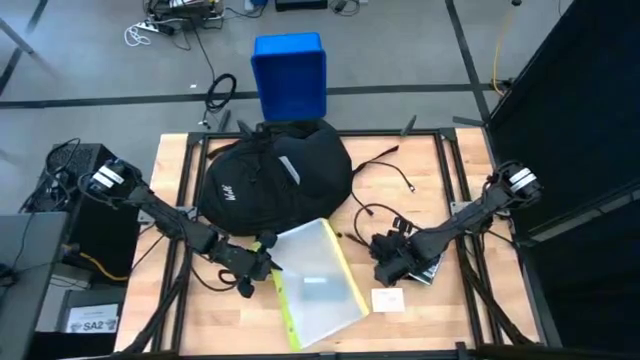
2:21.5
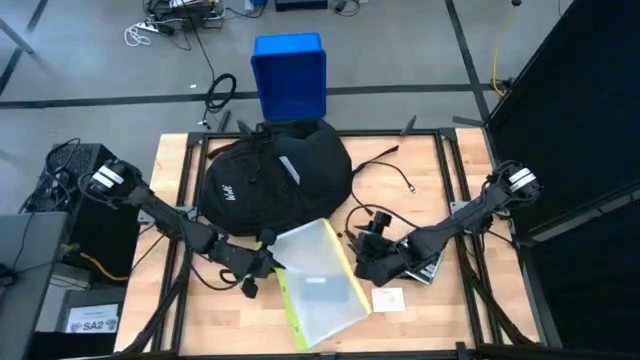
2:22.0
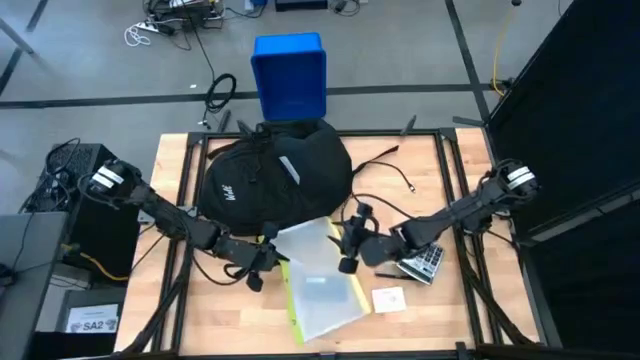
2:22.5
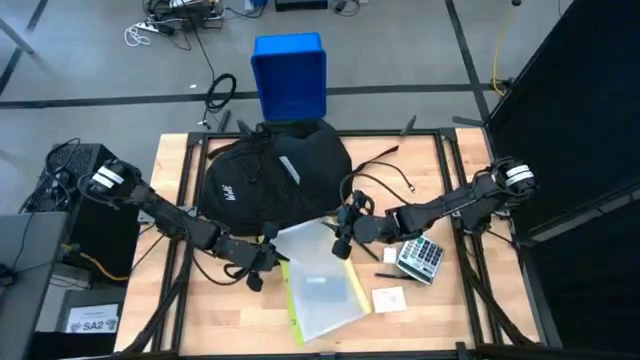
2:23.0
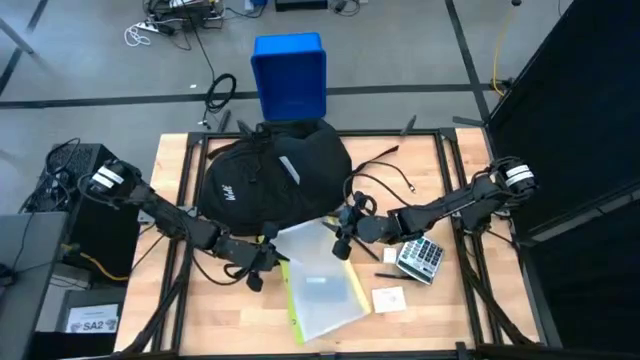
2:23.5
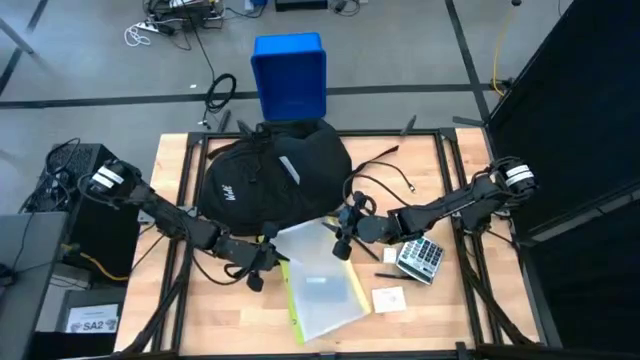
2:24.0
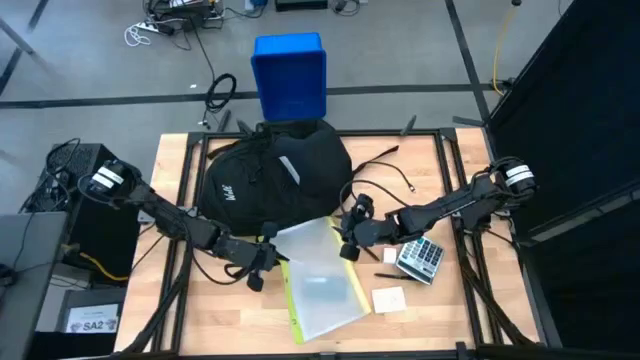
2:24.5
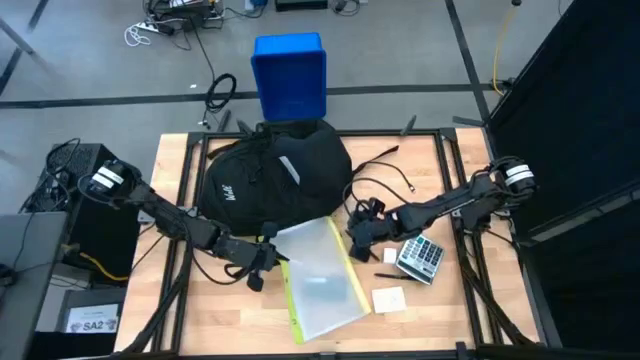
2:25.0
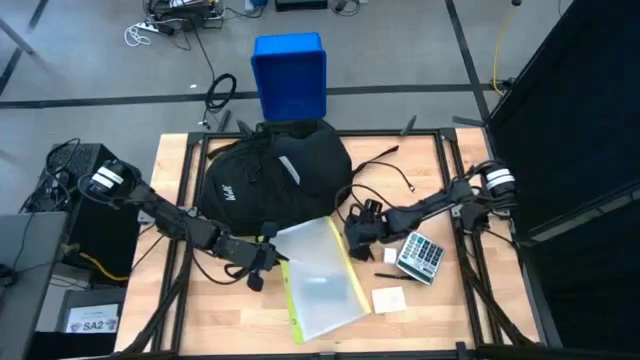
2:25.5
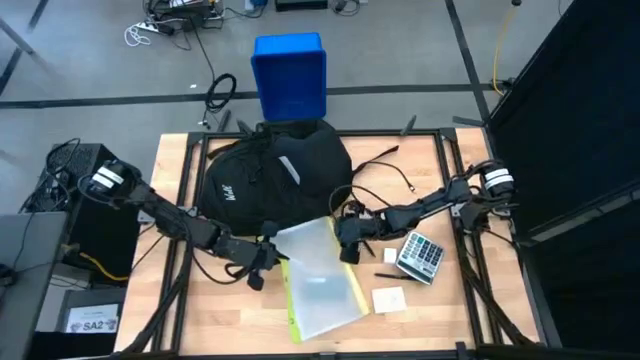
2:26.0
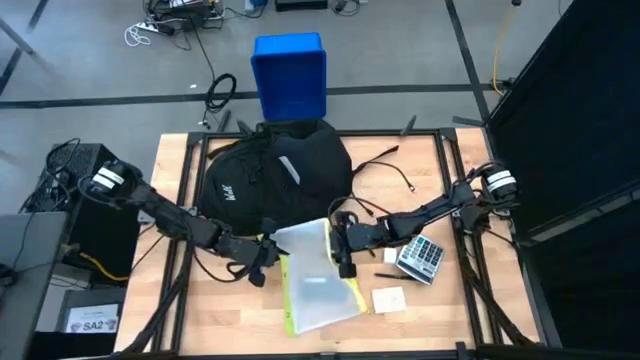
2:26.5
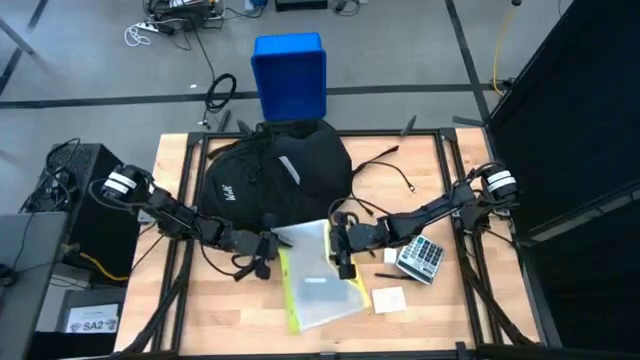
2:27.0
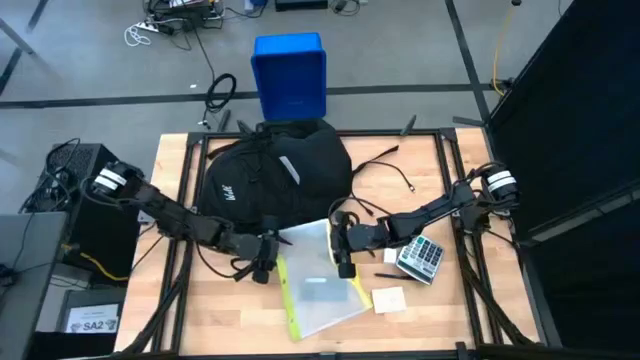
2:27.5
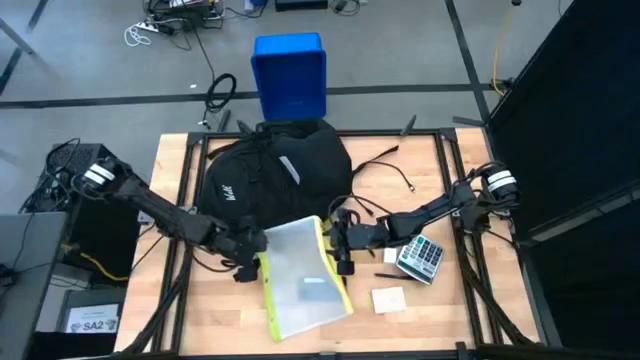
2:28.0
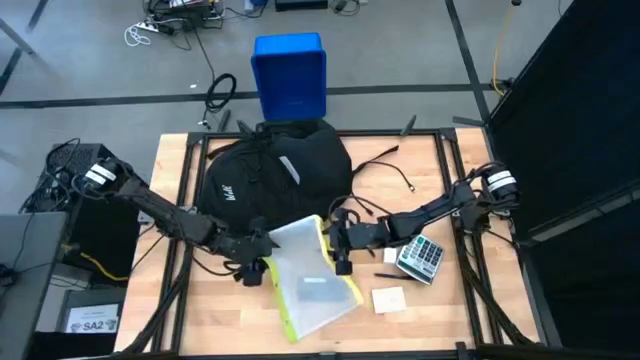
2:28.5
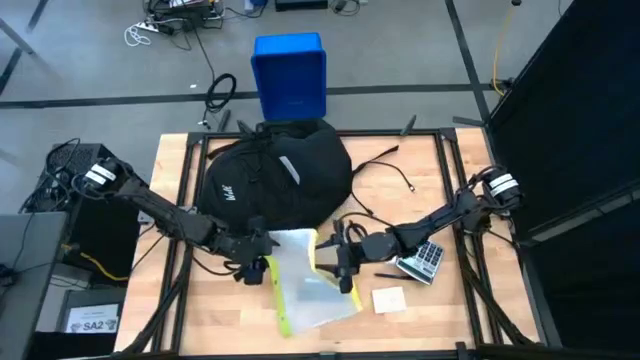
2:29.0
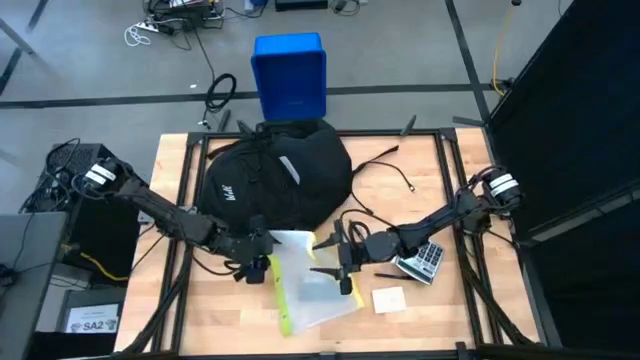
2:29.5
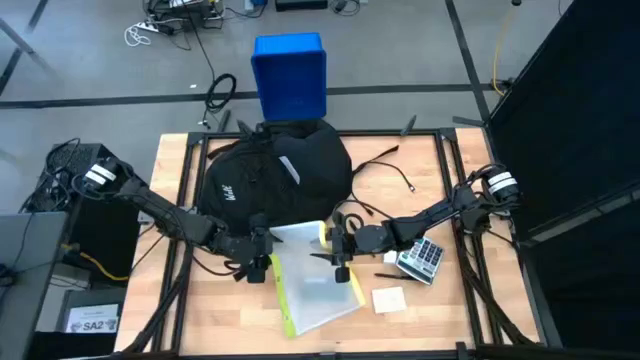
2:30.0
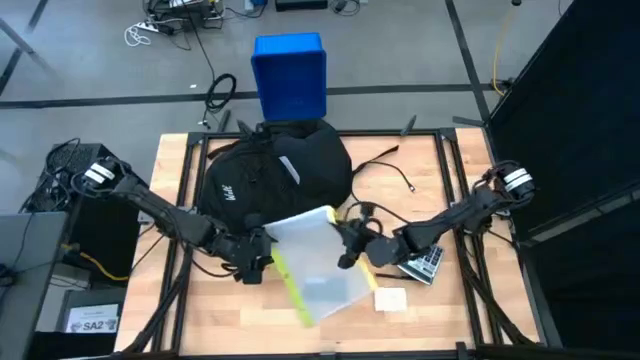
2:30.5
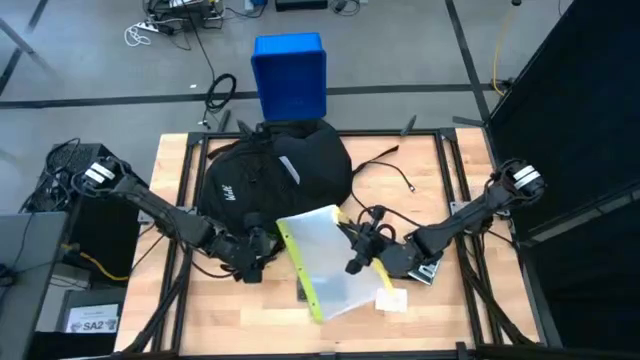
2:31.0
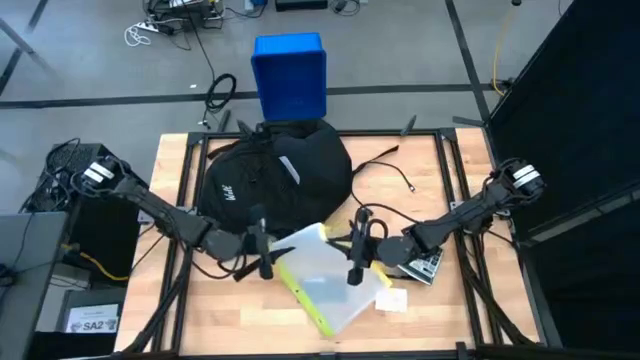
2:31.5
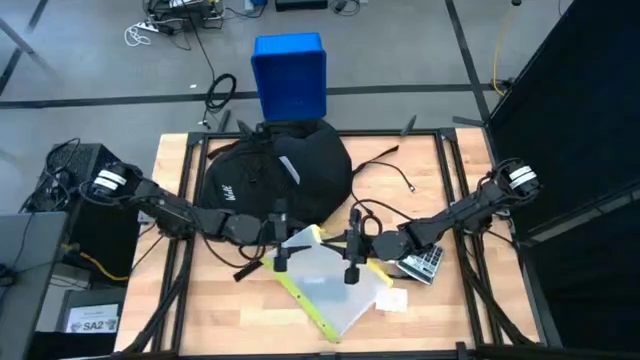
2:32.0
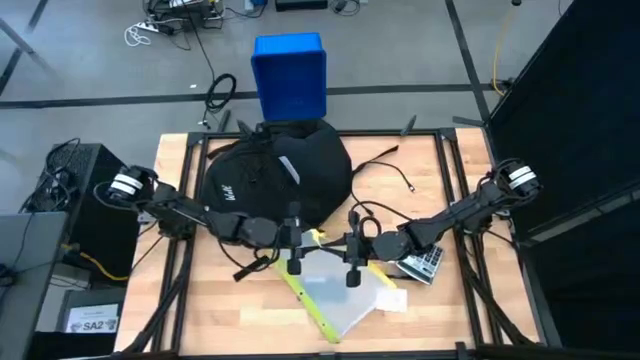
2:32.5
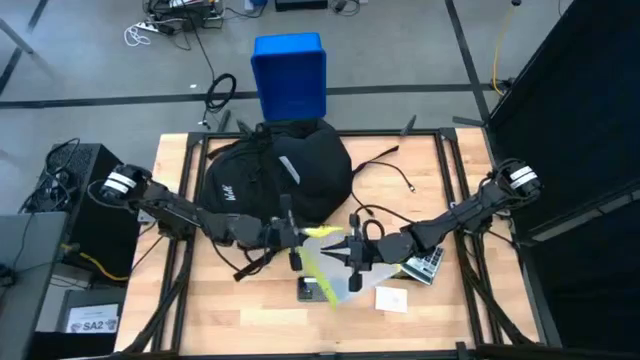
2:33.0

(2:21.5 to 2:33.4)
Task: Unpack backpack
Prepare the zip bag

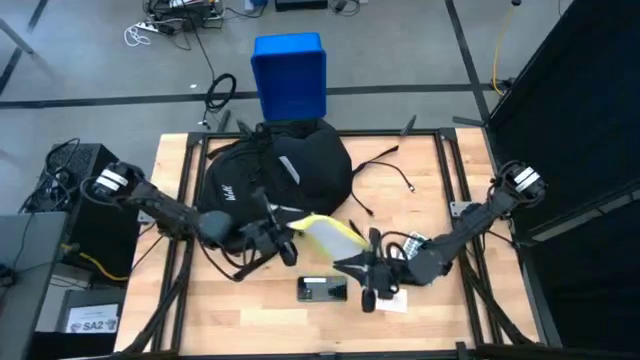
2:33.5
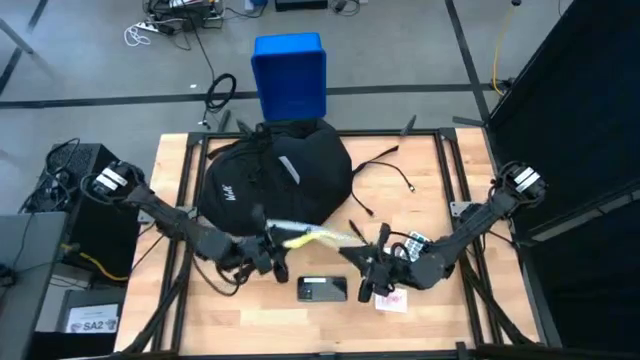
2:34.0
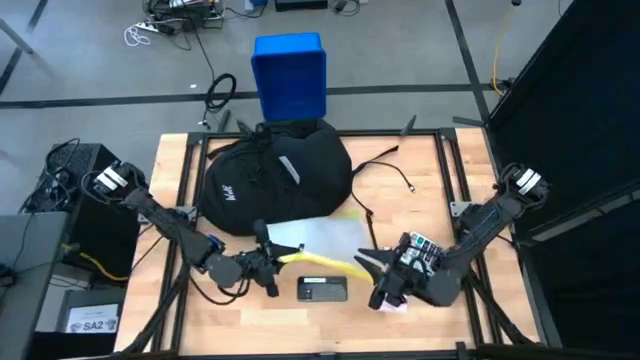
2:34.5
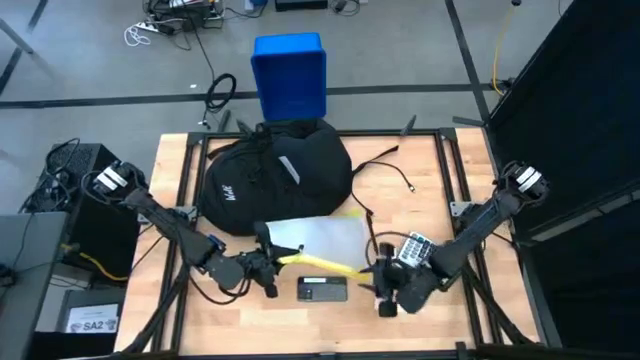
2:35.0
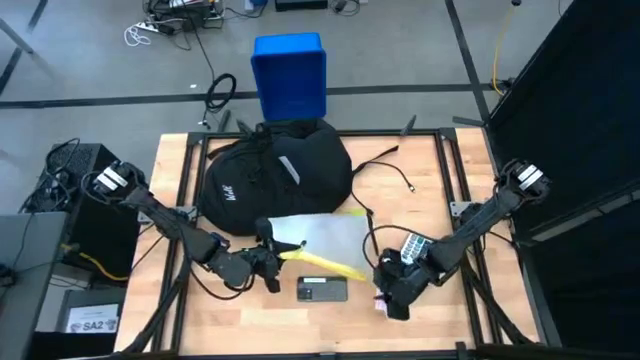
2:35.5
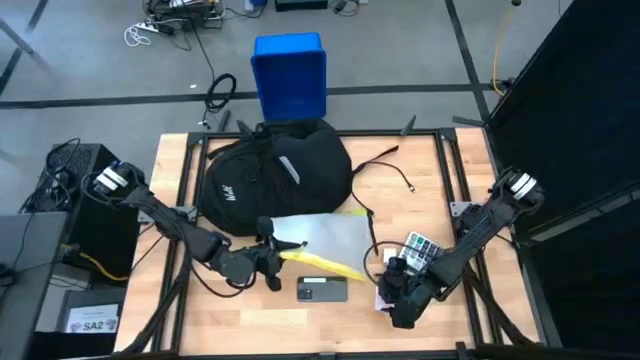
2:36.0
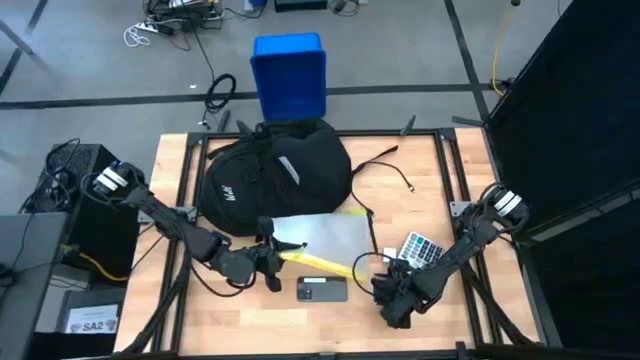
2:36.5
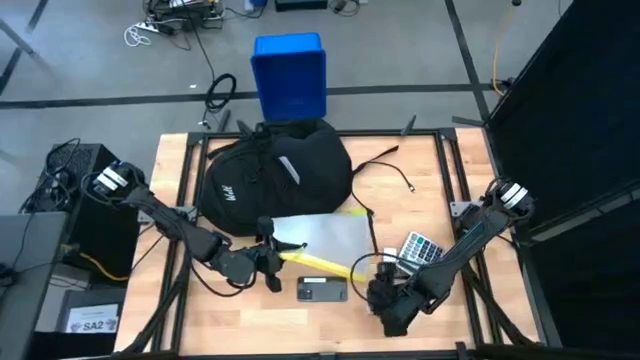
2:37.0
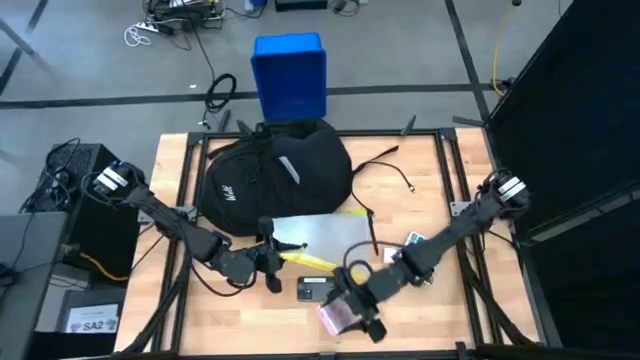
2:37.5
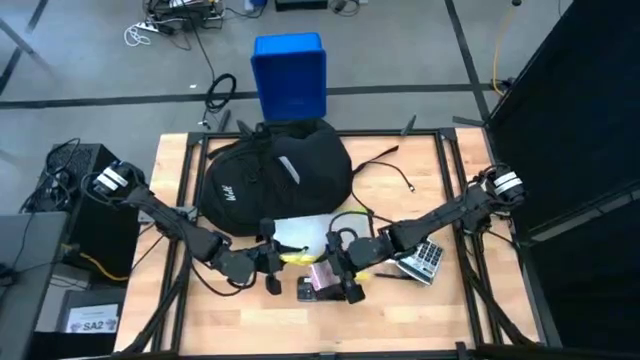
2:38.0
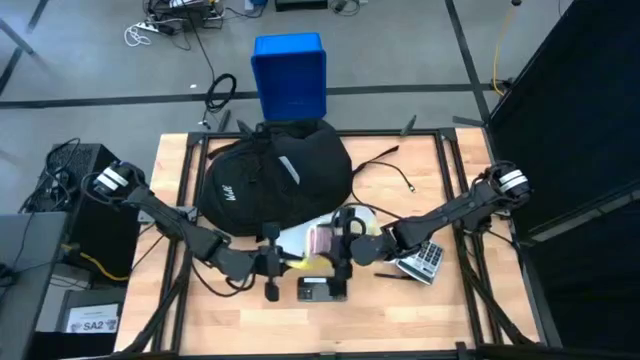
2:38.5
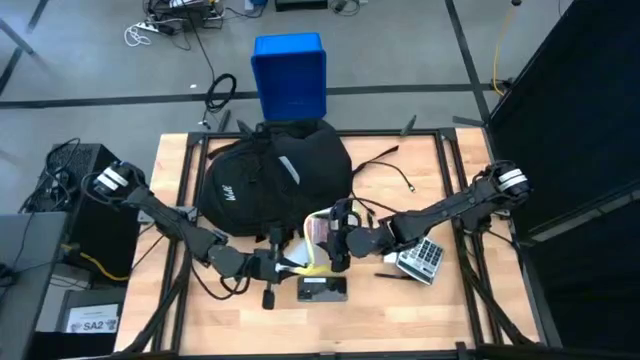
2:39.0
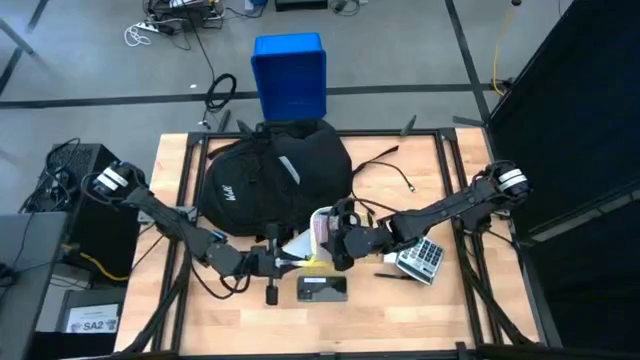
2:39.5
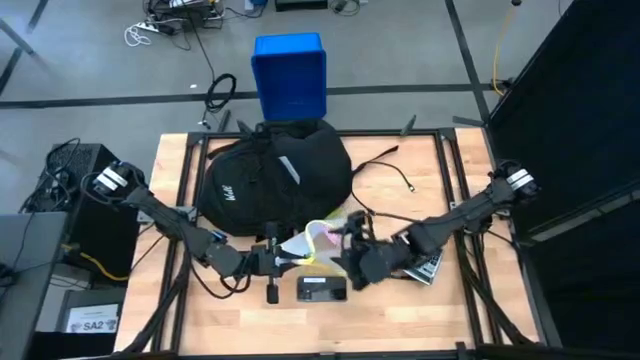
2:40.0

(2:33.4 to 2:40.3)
Put the game card into the zip bag

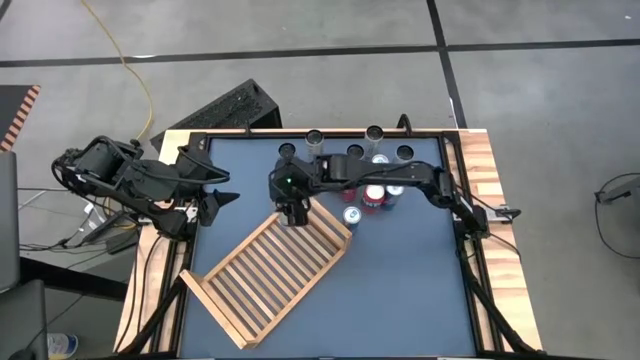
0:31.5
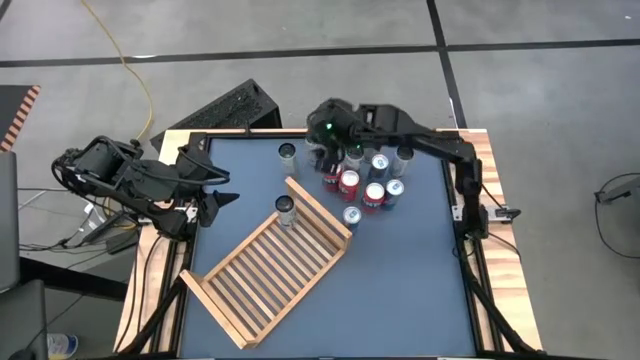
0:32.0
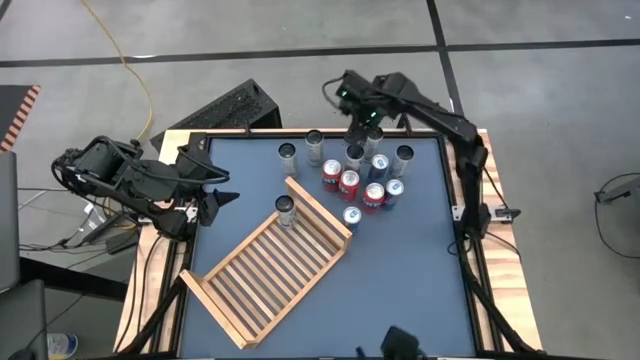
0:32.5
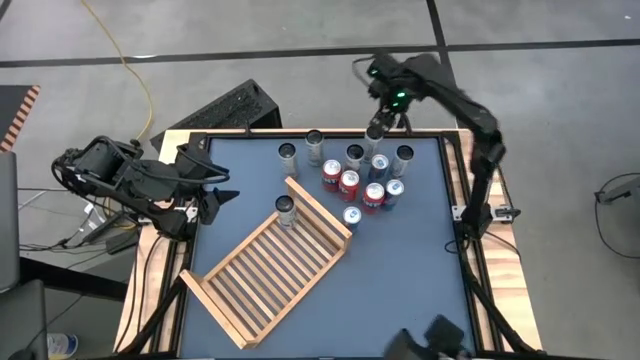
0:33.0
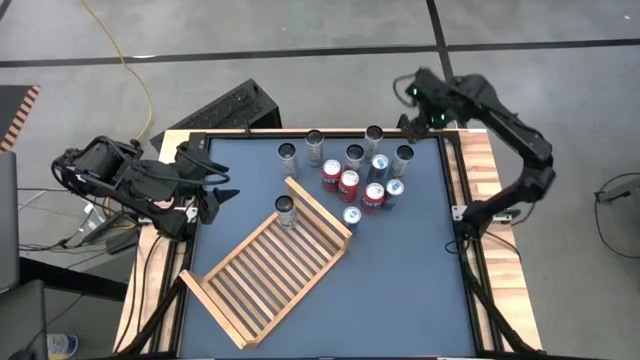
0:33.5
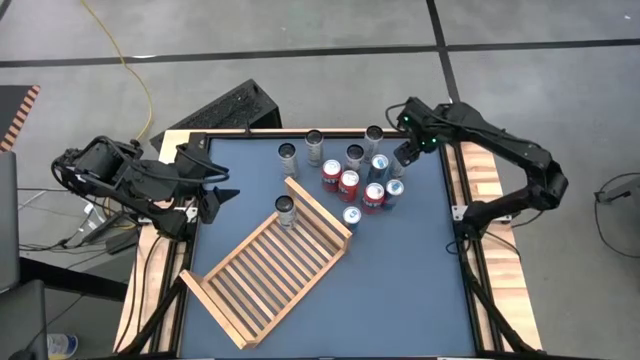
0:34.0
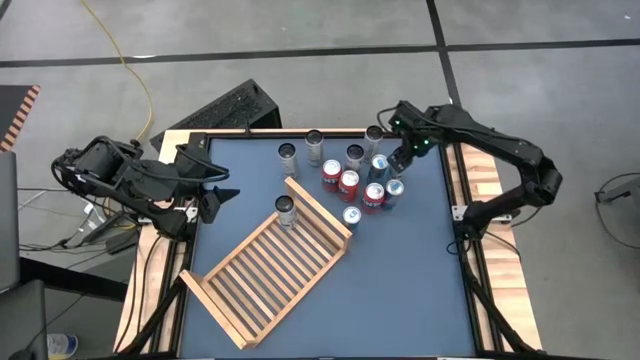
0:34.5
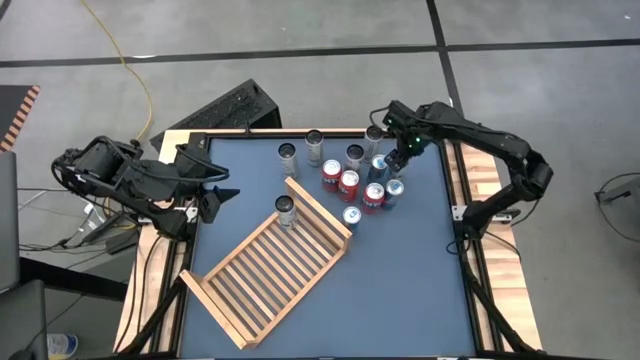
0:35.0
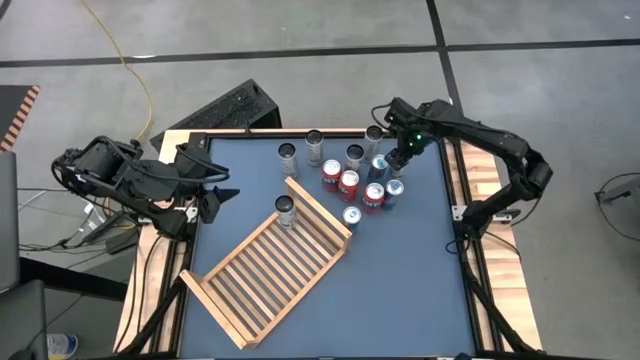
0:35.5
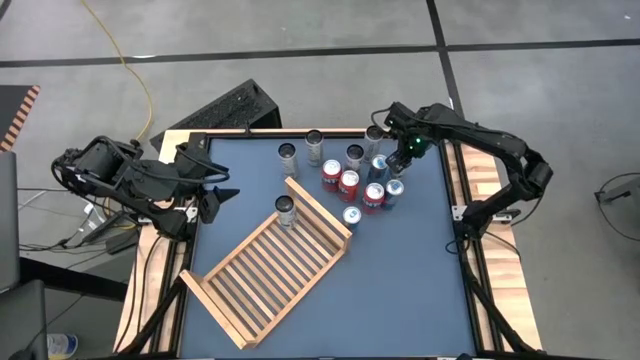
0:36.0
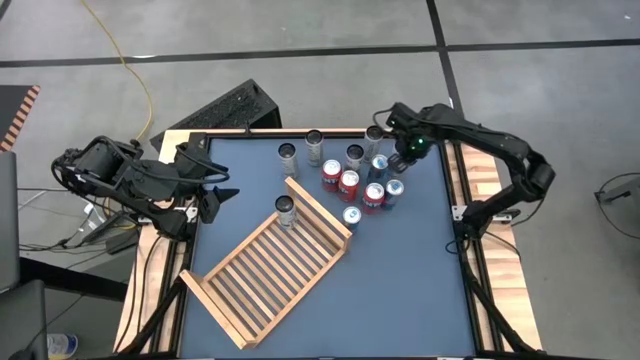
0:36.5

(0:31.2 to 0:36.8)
Task: Place canned beverage on shelf
Put the right white blue soda can on the shelf aligned with the other white blue soda can
